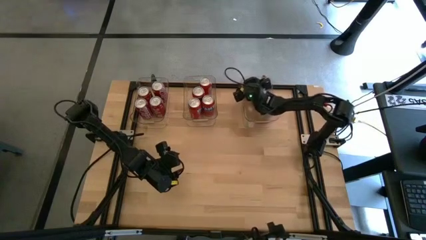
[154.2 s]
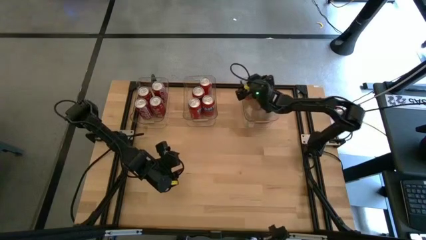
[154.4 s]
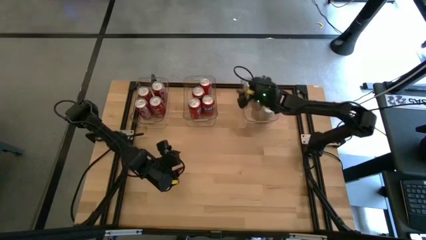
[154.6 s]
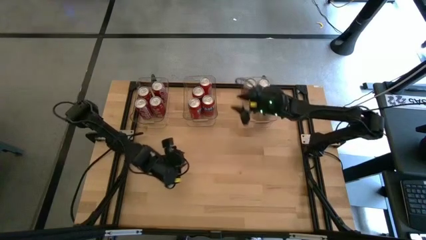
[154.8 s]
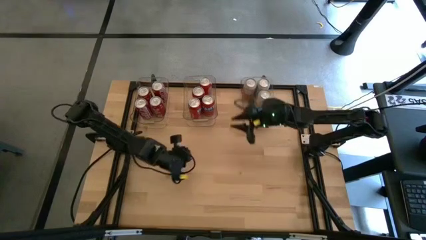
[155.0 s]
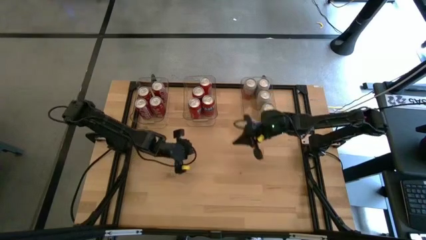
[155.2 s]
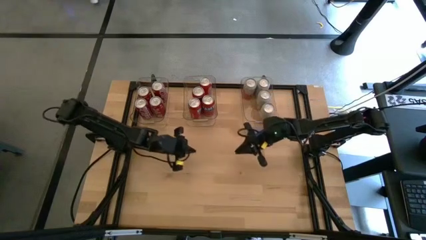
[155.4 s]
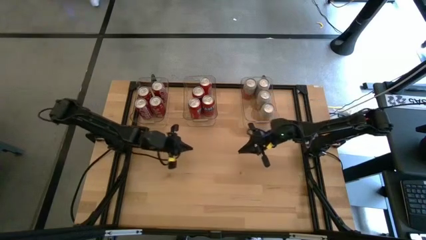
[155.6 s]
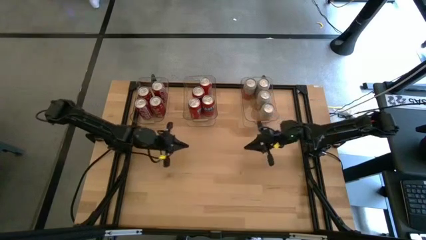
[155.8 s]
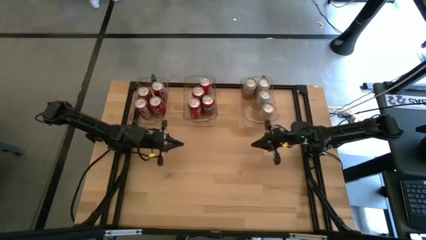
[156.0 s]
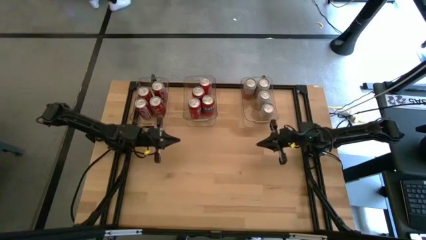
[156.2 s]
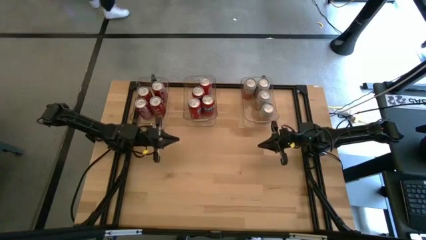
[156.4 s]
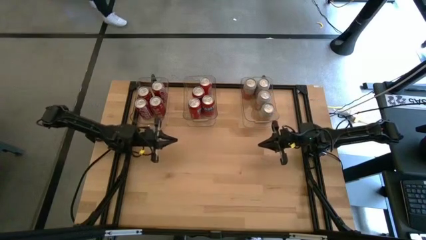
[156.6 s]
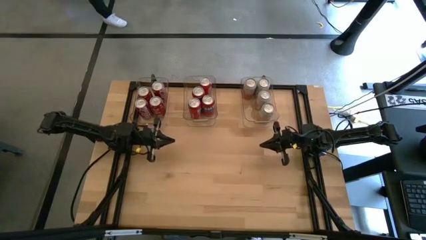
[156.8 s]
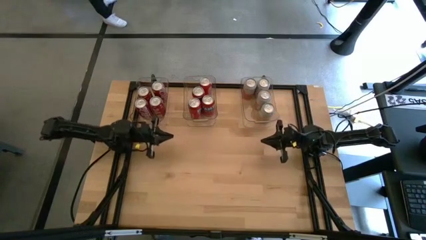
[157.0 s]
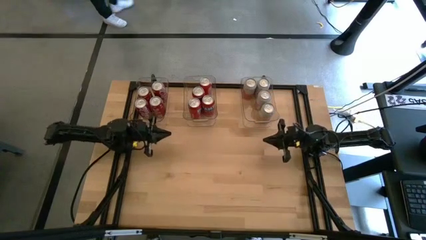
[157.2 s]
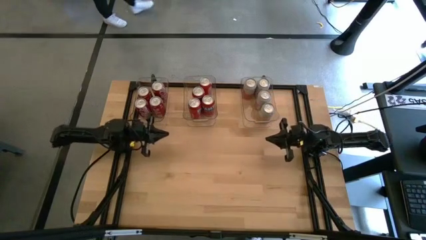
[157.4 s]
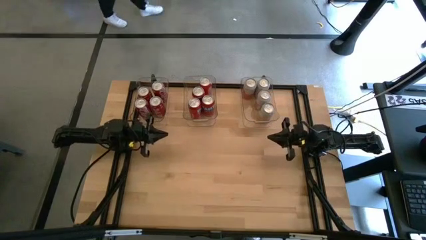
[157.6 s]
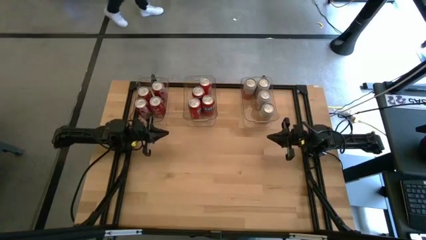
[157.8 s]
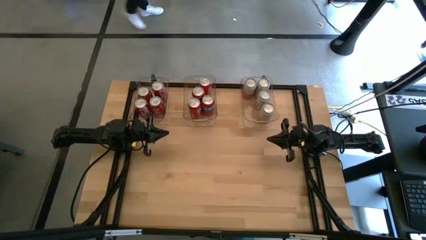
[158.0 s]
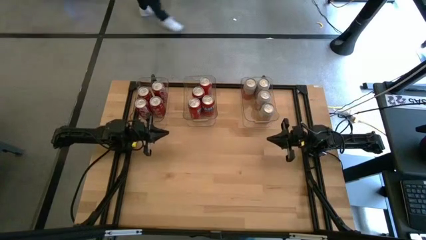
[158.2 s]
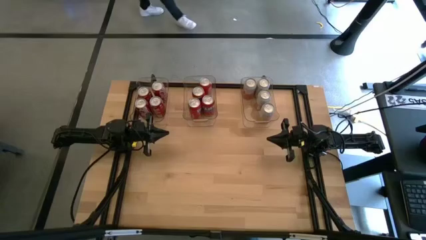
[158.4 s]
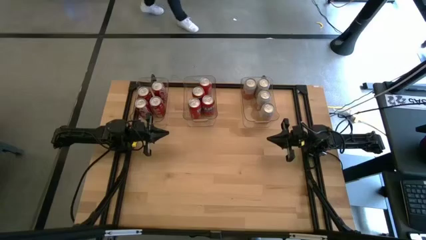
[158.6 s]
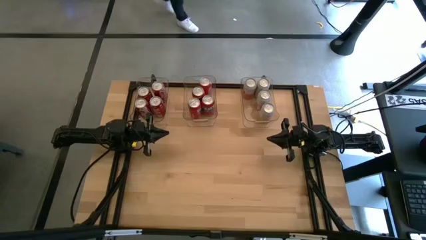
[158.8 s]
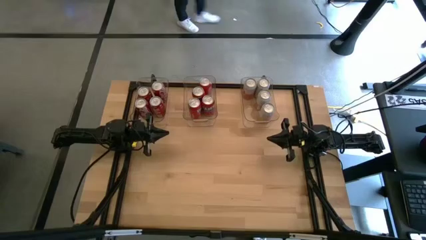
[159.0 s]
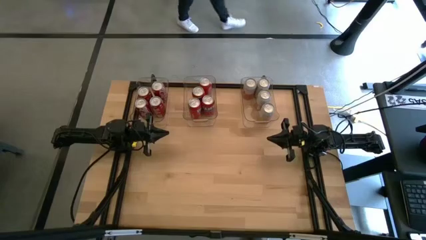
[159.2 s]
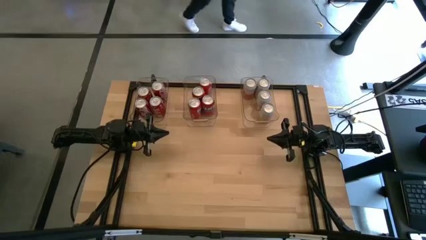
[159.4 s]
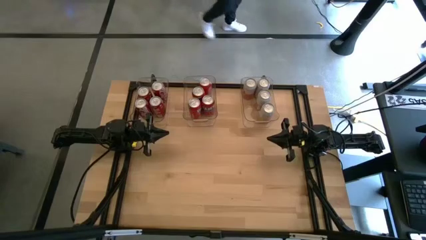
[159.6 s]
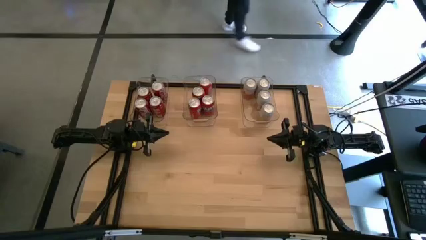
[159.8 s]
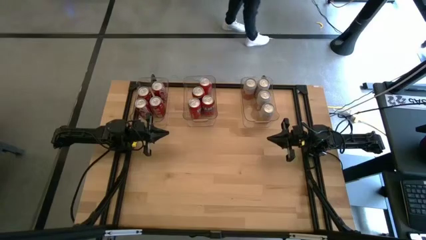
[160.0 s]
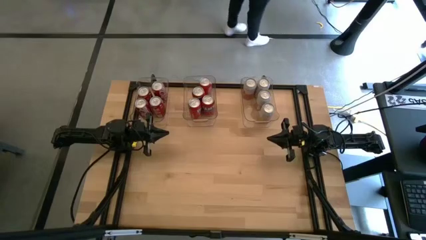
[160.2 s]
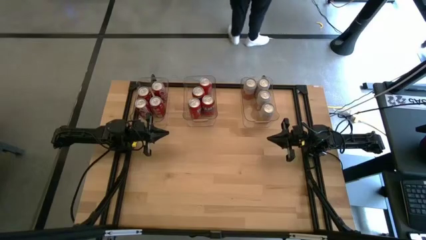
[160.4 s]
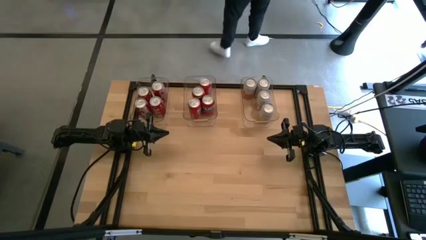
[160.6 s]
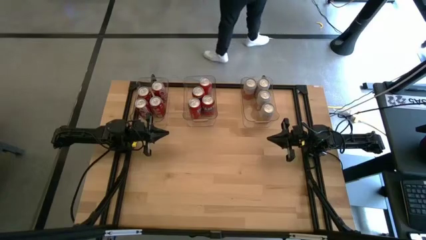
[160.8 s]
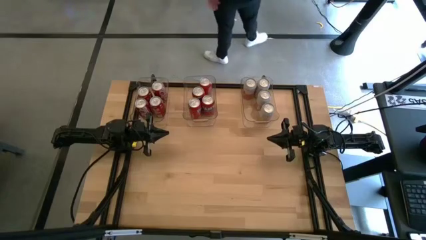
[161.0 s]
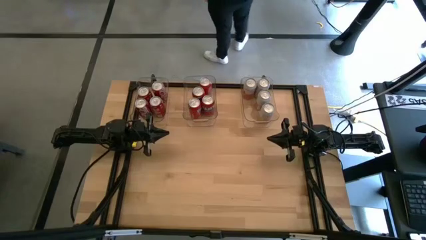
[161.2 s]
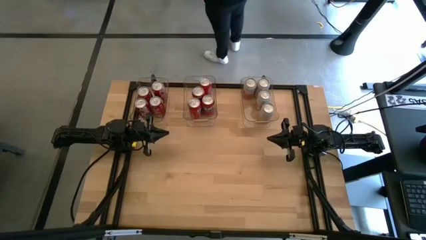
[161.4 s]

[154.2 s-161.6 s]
Task: Sort soda cans
Return to Home Position

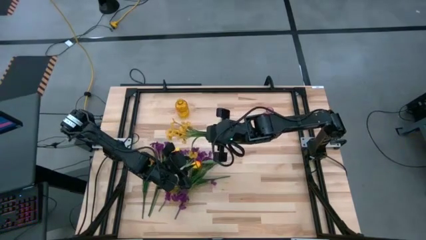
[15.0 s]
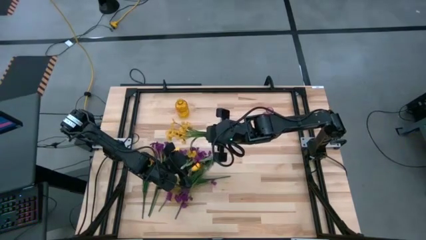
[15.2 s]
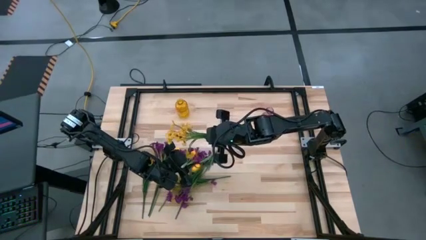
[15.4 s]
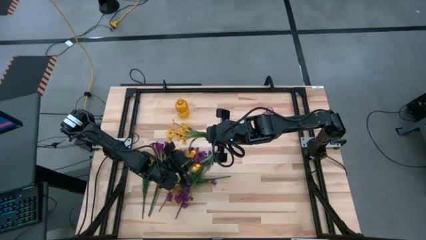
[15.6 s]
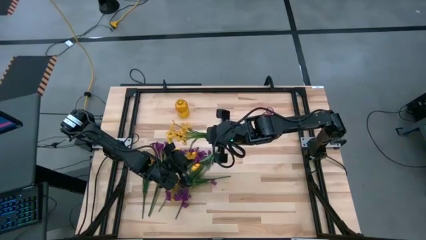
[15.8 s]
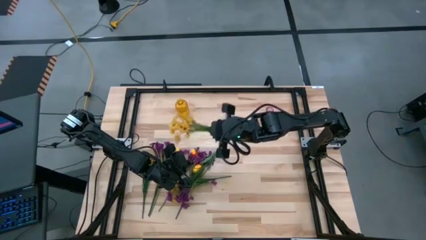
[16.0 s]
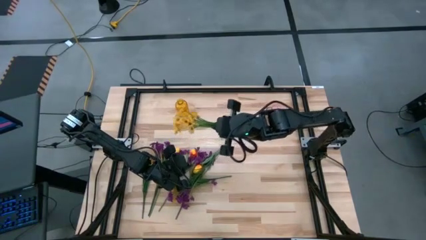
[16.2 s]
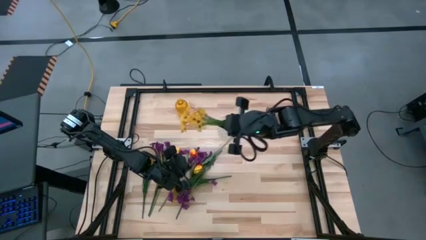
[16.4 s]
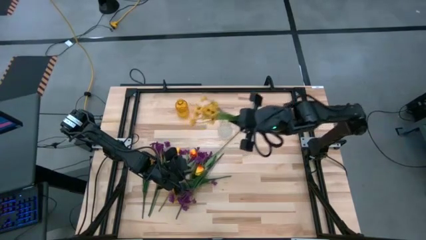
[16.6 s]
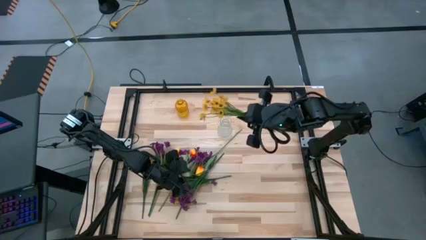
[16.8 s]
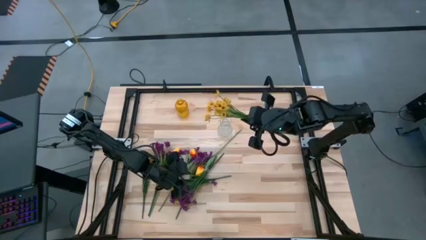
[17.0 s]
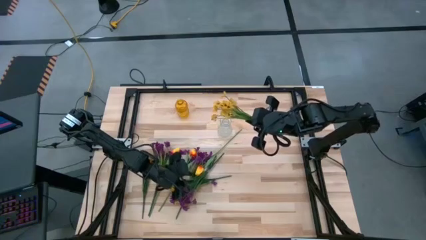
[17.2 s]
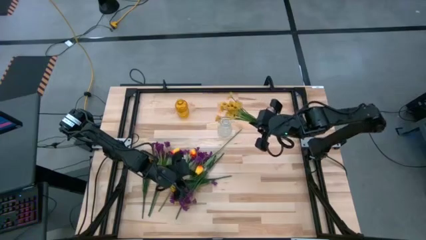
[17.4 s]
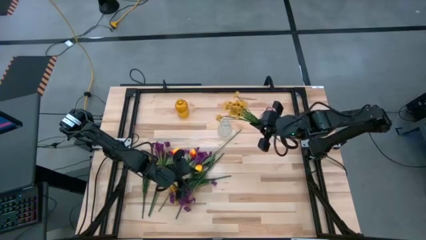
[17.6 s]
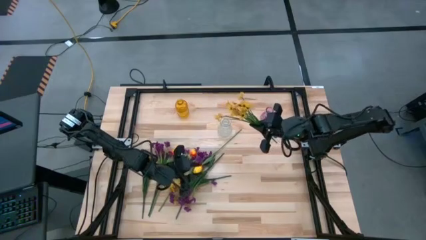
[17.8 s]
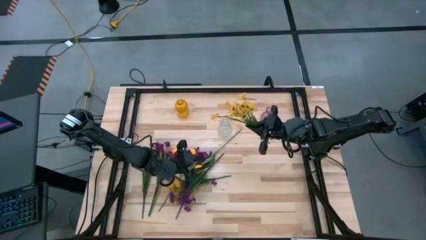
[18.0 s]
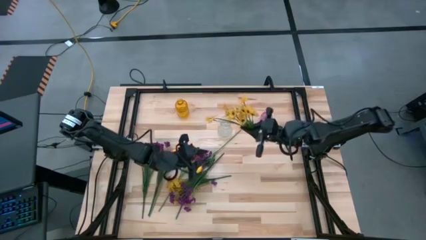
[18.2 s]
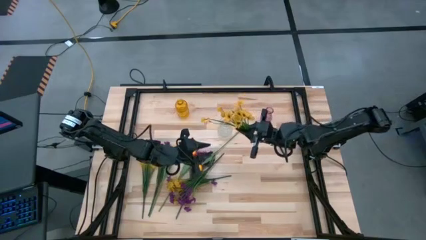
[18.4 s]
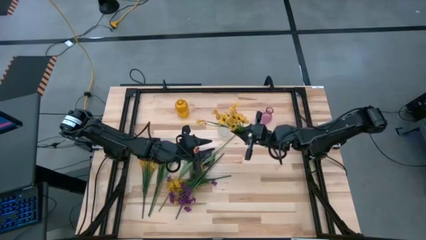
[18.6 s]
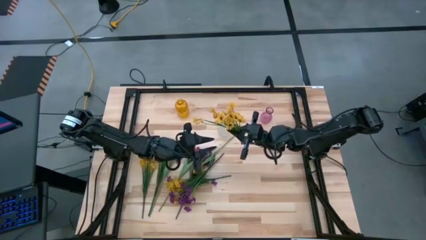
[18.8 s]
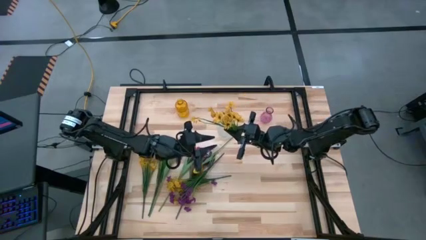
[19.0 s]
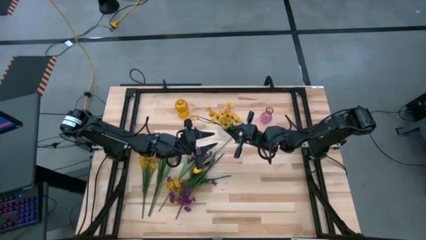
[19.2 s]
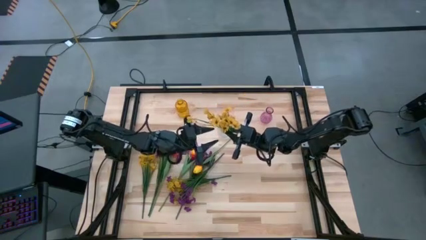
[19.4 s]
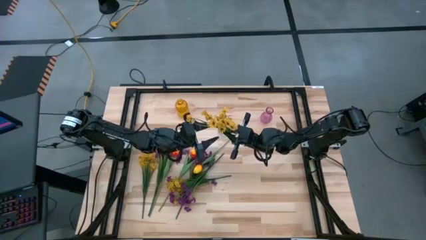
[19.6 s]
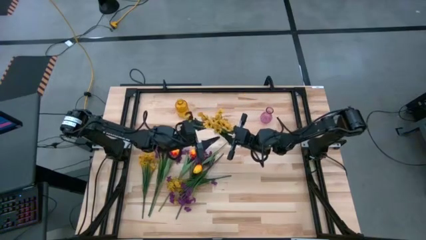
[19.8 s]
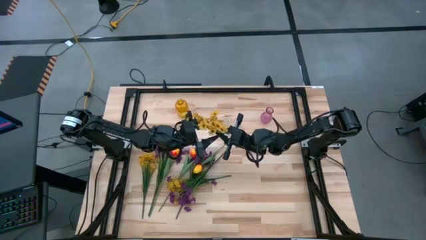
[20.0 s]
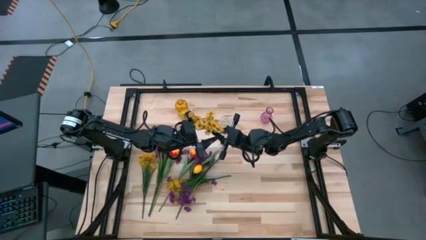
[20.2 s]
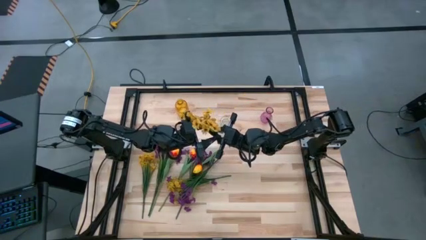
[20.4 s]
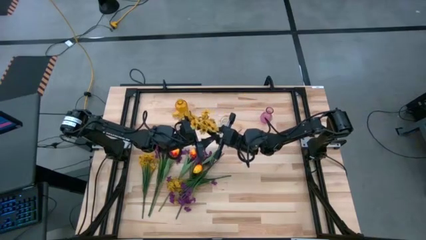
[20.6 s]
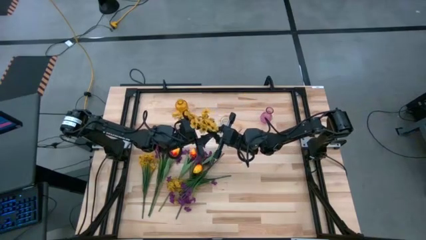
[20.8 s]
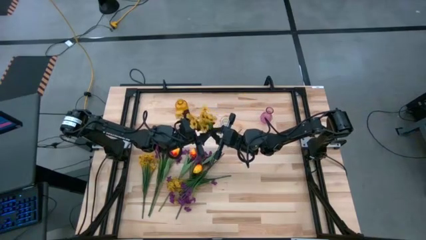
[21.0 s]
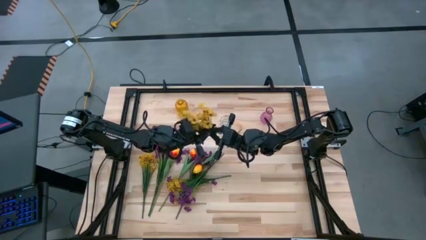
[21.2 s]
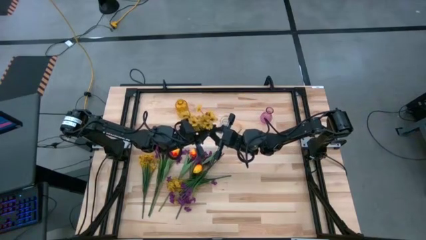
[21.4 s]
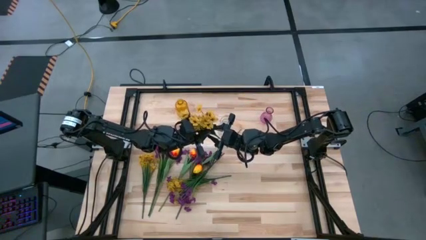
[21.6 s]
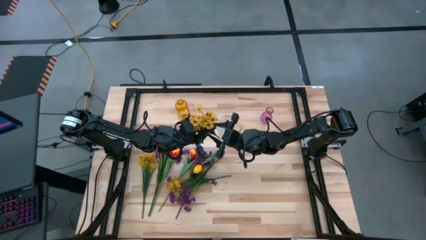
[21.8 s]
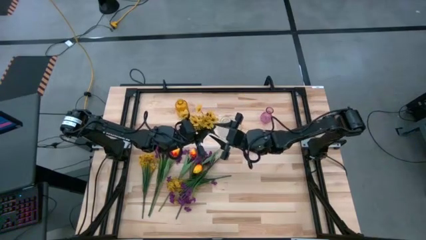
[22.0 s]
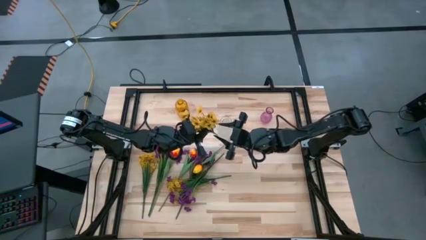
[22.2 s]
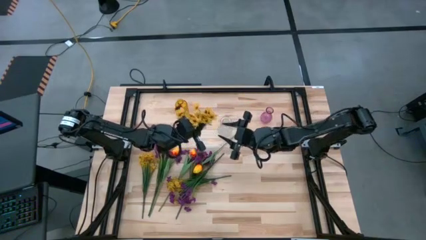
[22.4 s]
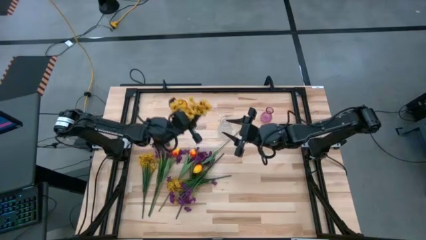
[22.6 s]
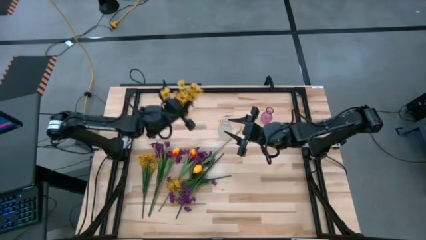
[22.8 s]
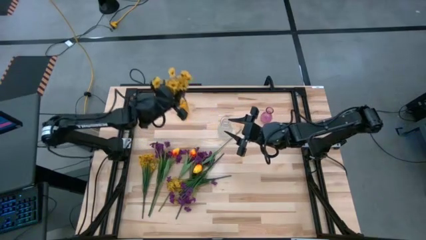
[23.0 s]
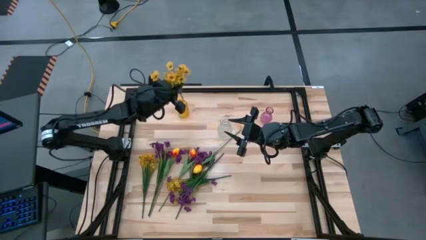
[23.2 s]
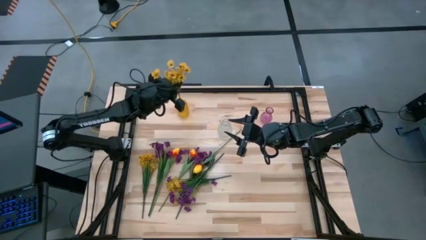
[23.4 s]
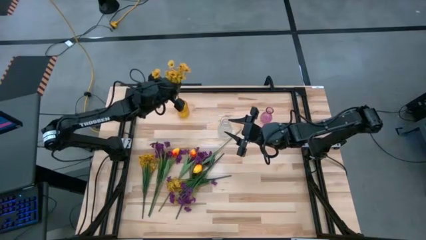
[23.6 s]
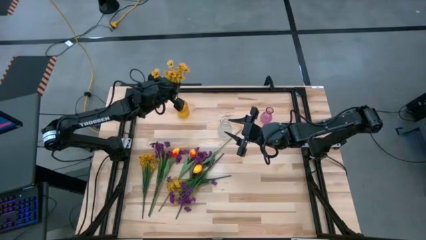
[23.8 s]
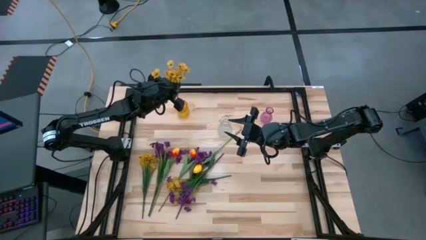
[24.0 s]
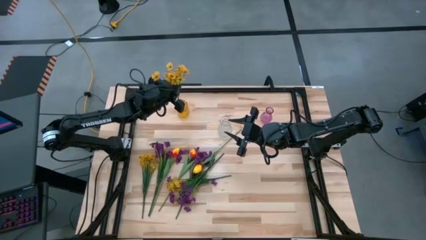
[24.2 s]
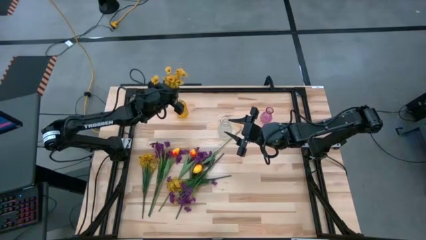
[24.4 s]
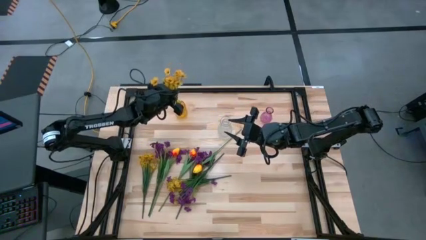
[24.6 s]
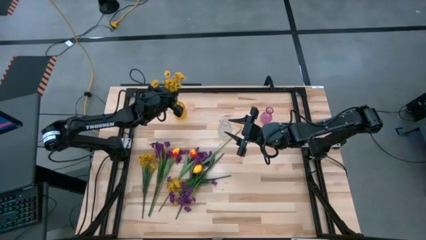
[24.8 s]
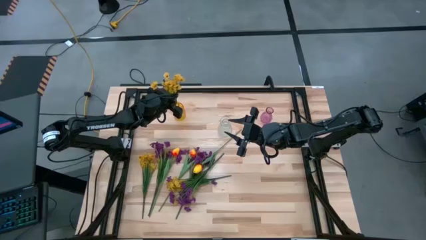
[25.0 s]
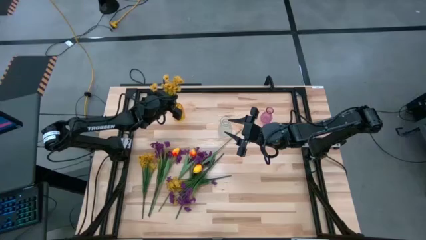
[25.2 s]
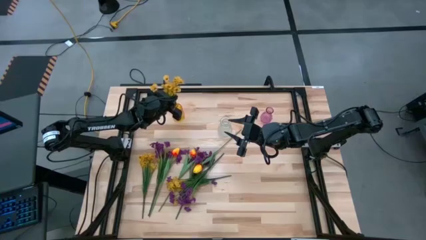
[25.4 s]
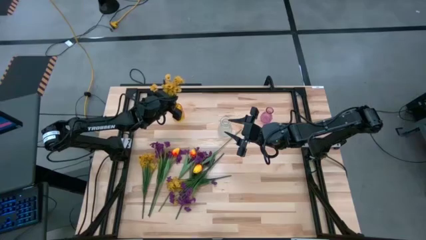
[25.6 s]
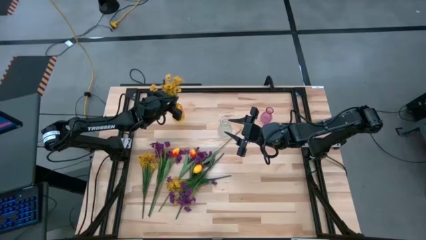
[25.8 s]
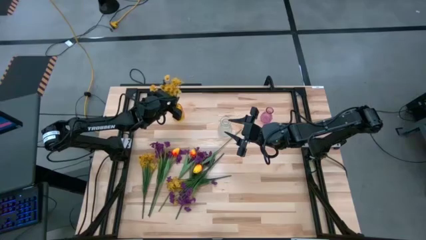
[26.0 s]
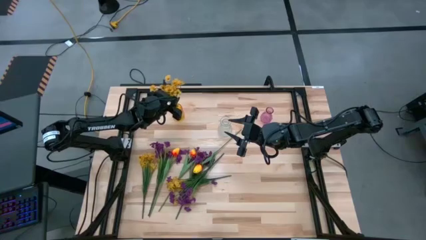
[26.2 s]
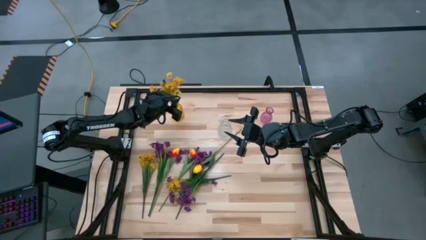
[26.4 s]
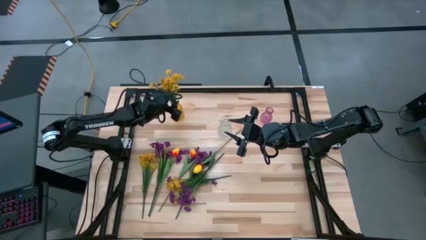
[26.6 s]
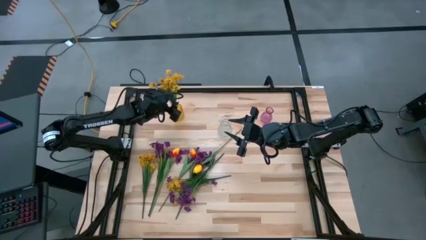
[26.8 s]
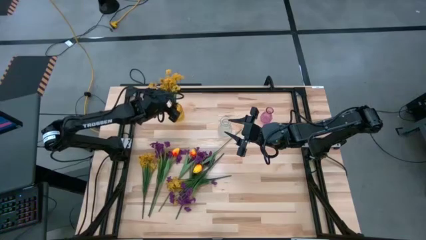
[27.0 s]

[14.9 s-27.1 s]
Task: Sort flowers into vase by color
Put the yellow flowers into the yellow vase
